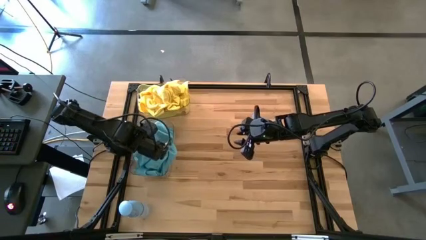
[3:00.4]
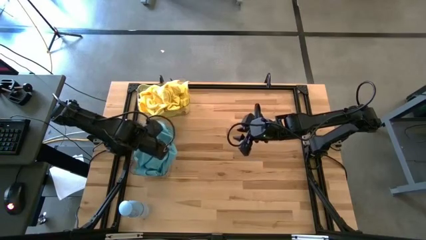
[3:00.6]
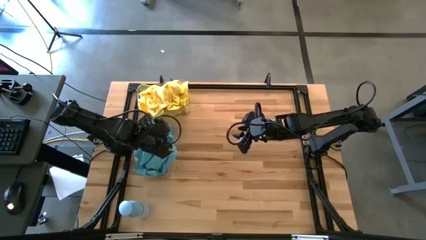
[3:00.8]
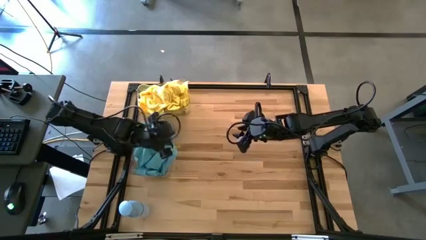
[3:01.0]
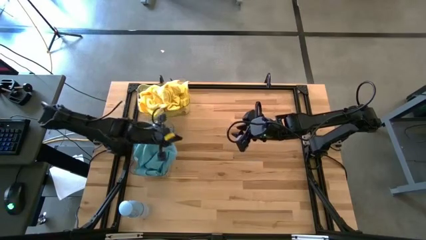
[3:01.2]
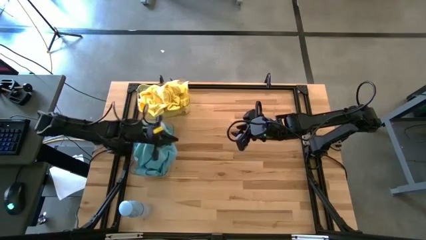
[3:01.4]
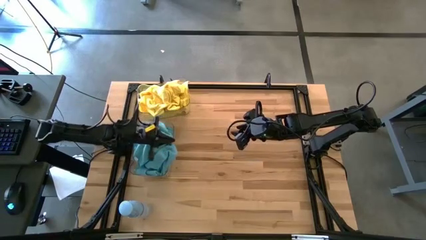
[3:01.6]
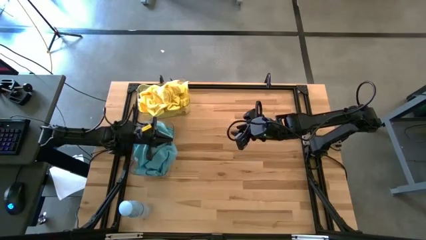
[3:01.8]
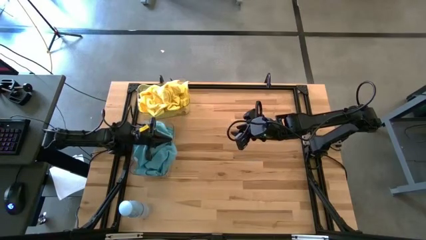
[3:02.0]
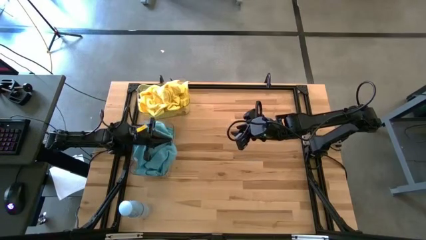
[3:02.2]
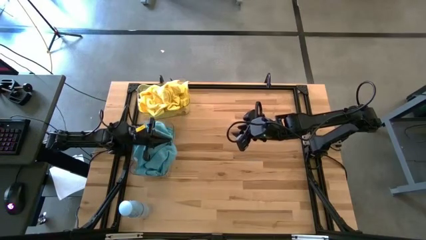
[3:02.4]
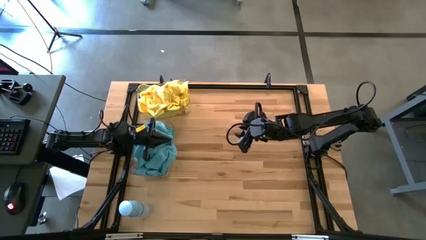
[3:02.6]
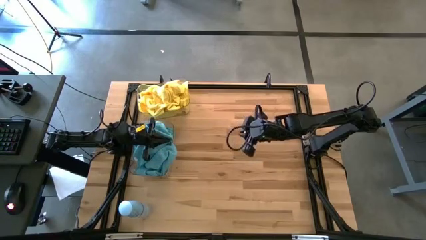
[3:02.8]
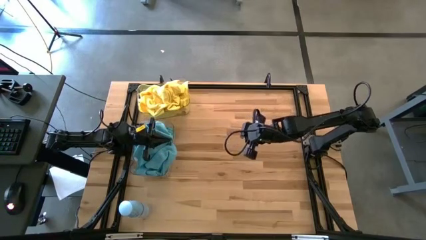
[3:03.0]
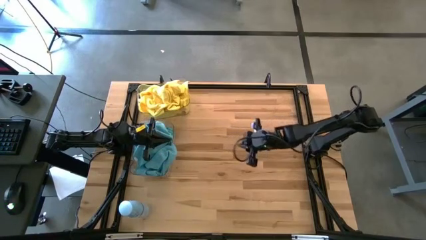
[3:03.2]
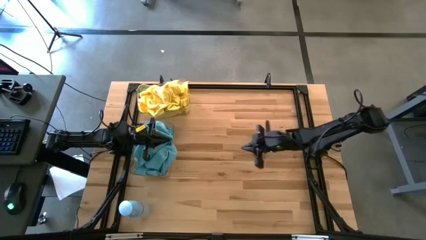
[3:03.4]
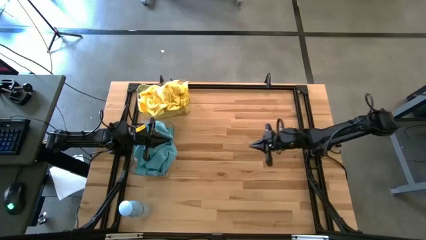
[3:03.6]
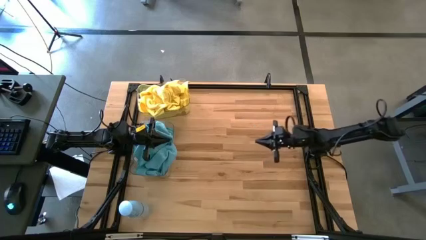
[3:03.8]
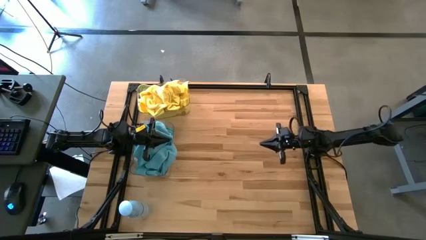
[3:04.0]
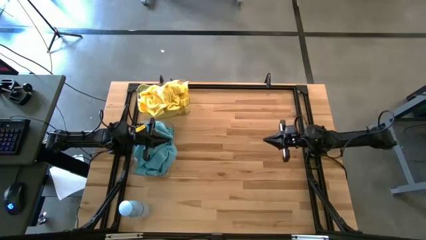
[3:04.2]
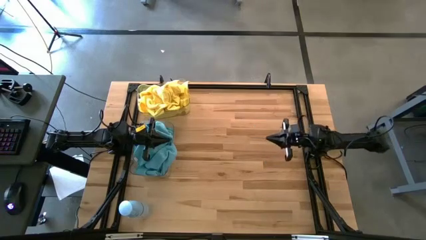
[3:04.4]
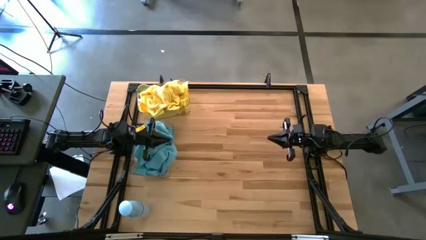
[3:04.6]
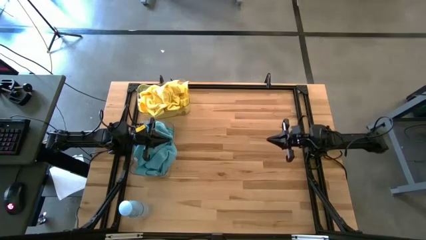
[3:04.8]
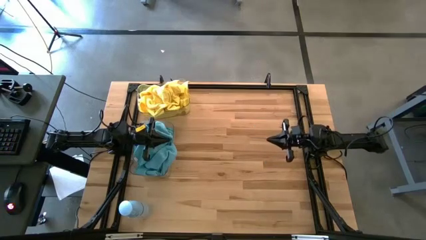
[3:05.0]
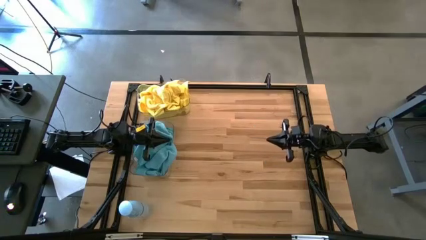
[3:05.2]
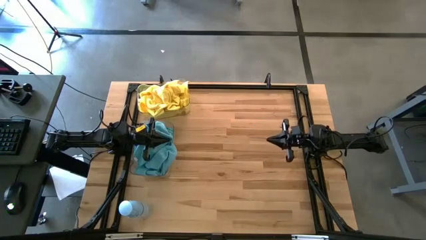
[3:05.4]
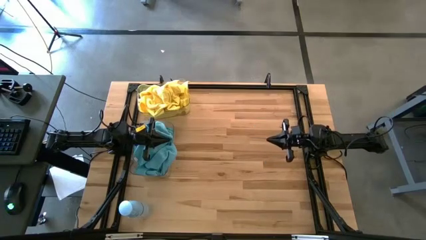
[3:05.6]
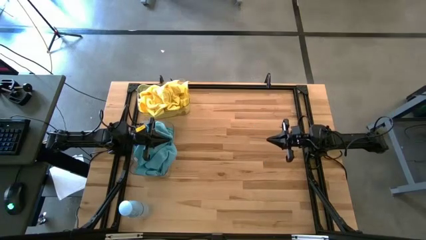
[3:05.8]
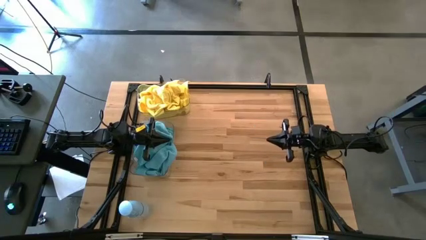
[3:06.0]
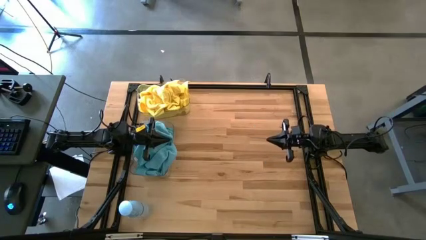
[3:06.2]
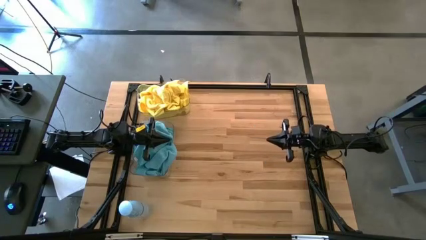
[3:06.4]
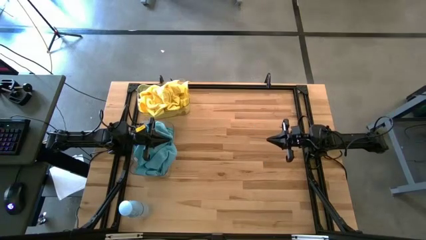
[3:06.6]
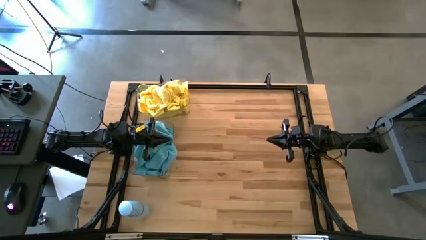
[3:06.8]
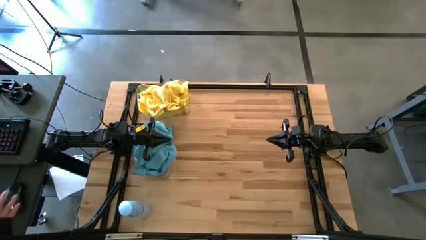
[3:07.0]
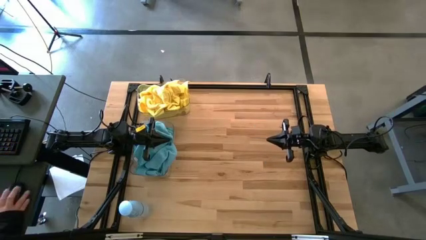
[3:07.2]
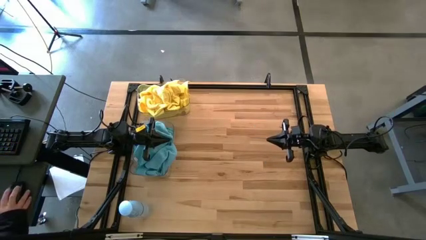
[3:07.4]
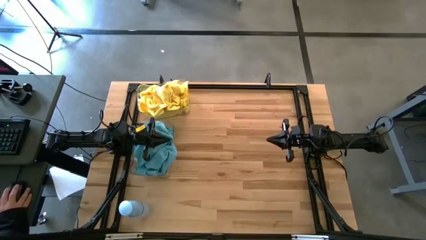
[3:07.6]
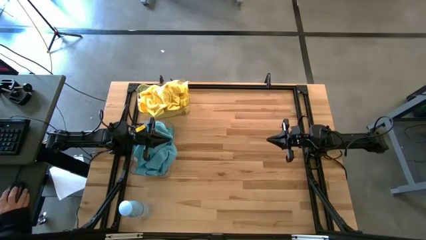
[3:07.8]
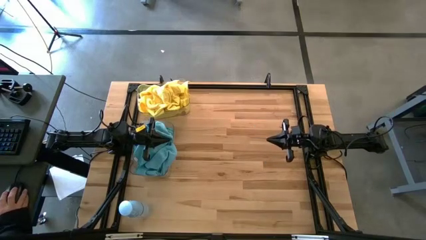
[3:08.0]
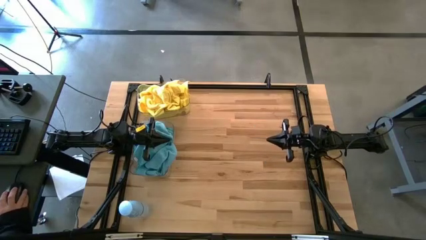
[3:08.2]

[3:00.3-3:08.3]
Task: Sort microfiber towel by color & place in baskets
Return to Home Position

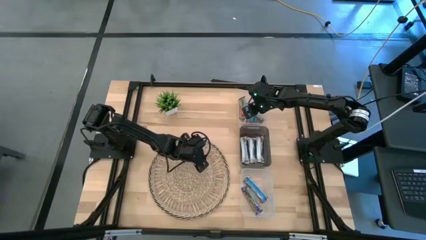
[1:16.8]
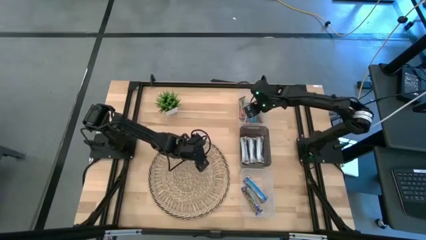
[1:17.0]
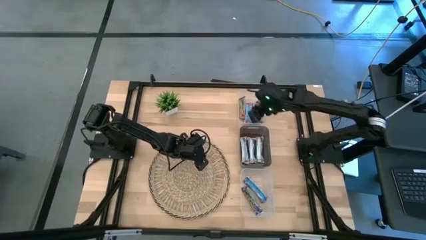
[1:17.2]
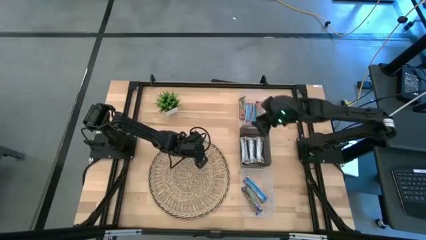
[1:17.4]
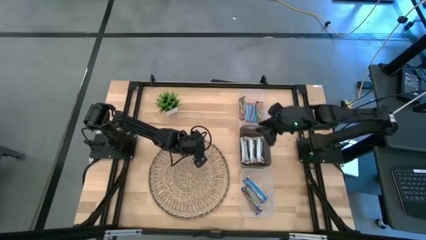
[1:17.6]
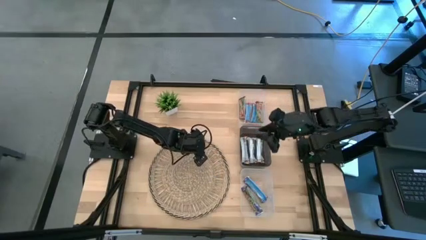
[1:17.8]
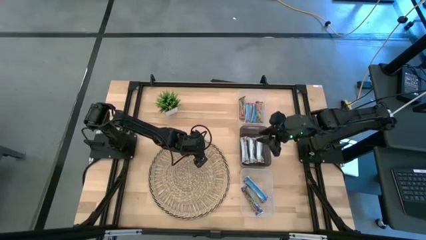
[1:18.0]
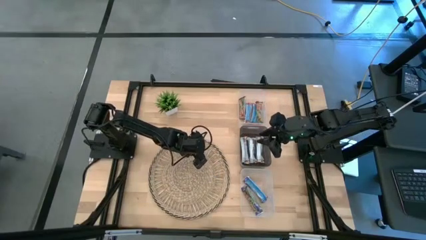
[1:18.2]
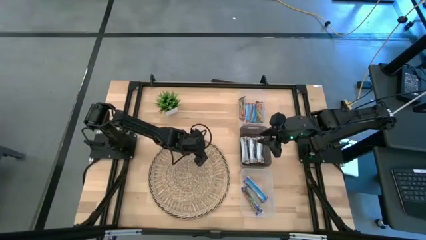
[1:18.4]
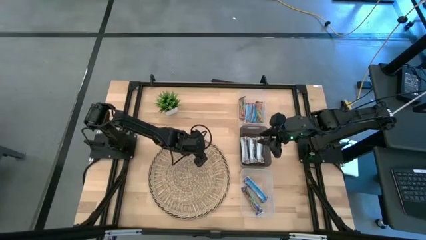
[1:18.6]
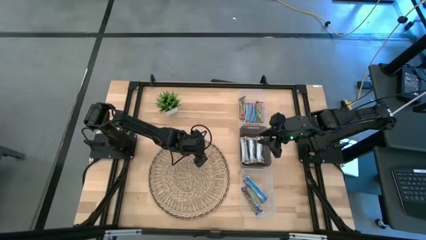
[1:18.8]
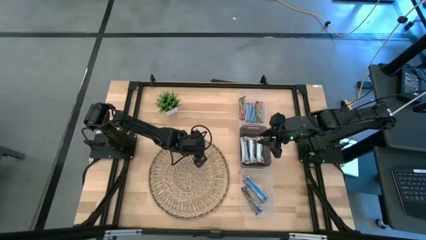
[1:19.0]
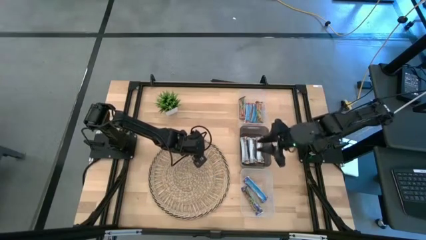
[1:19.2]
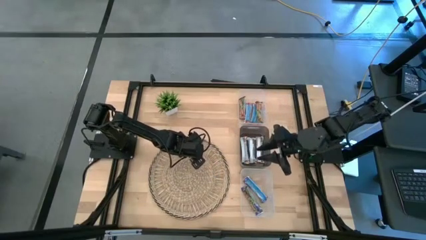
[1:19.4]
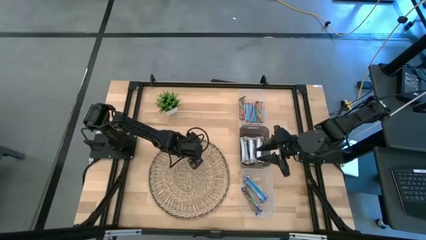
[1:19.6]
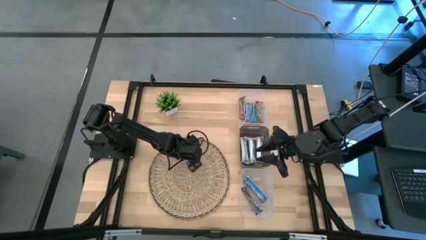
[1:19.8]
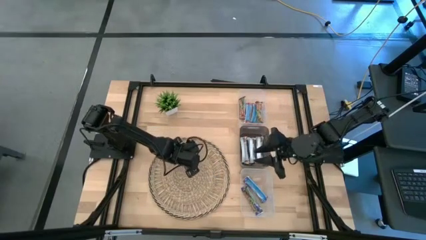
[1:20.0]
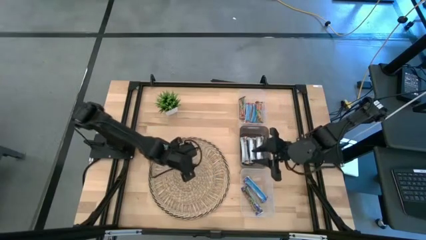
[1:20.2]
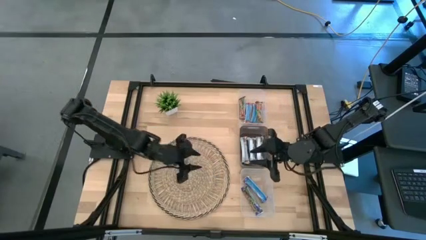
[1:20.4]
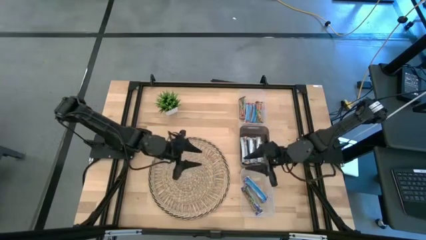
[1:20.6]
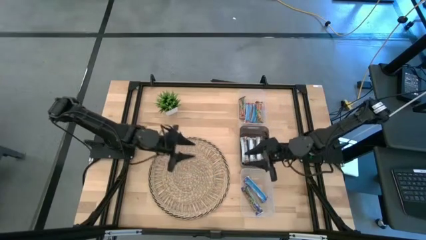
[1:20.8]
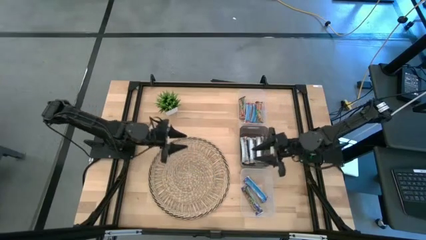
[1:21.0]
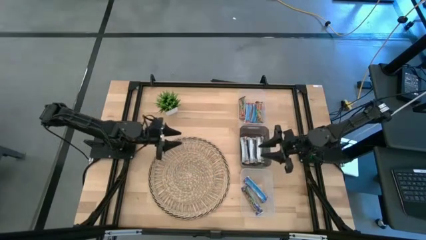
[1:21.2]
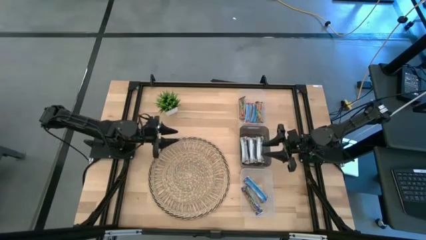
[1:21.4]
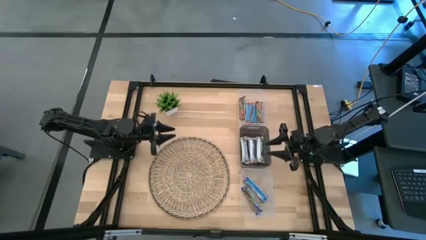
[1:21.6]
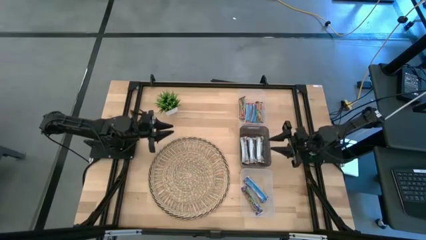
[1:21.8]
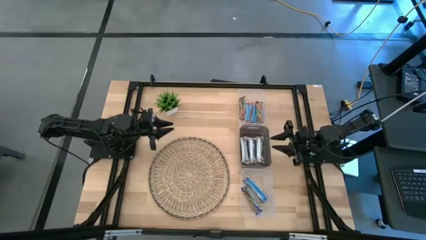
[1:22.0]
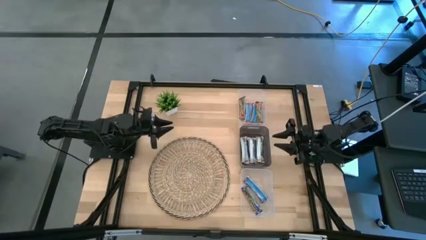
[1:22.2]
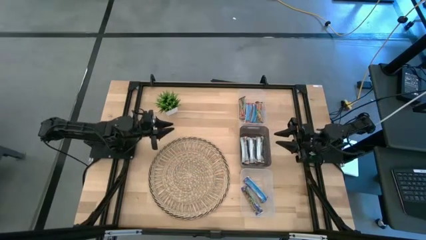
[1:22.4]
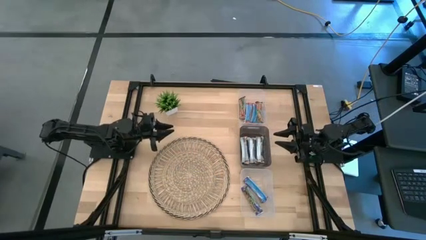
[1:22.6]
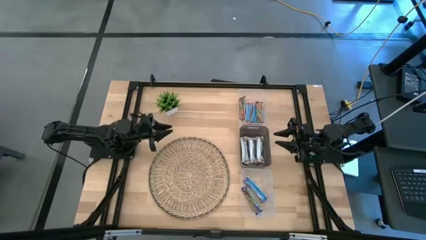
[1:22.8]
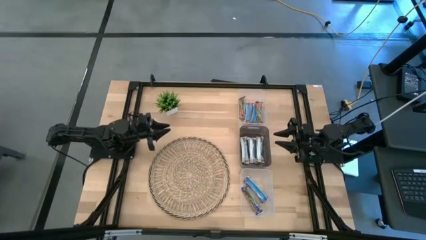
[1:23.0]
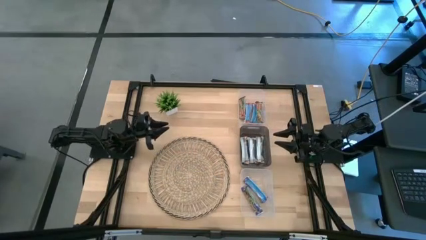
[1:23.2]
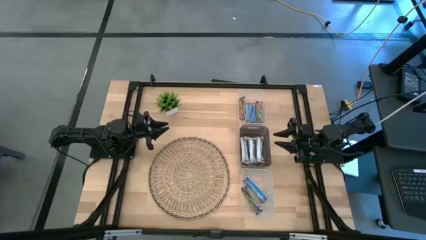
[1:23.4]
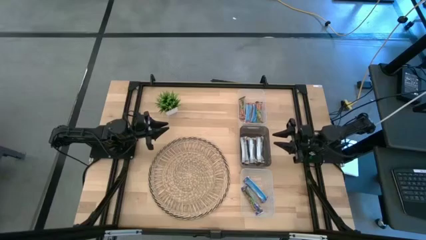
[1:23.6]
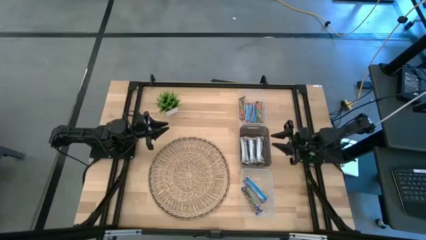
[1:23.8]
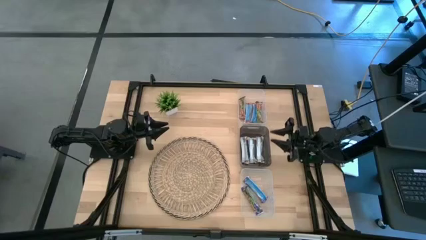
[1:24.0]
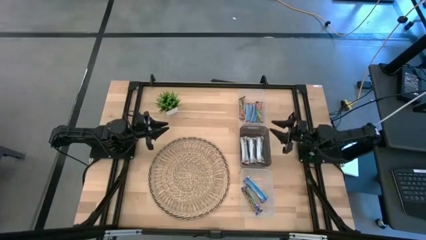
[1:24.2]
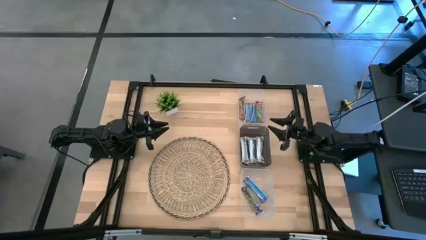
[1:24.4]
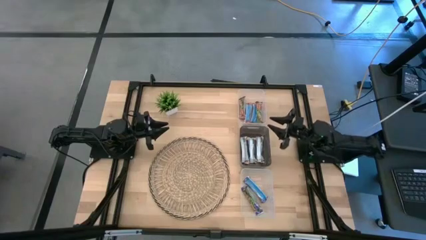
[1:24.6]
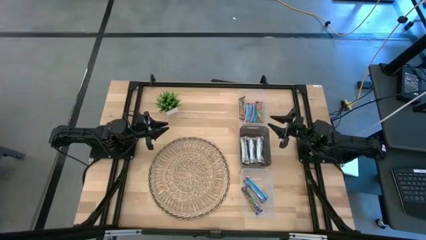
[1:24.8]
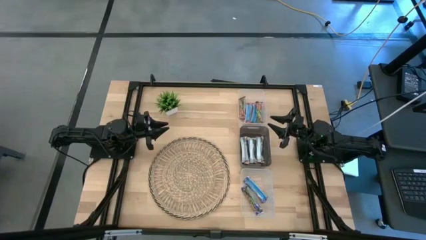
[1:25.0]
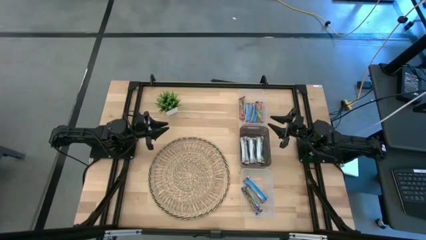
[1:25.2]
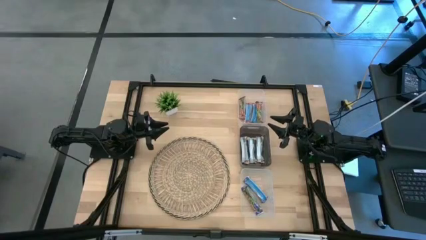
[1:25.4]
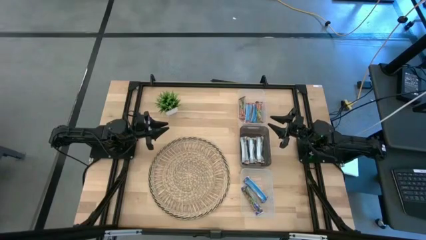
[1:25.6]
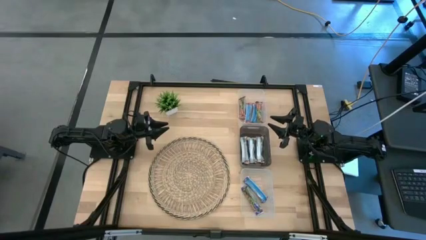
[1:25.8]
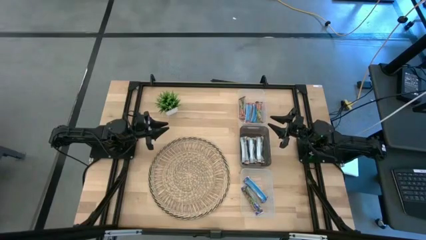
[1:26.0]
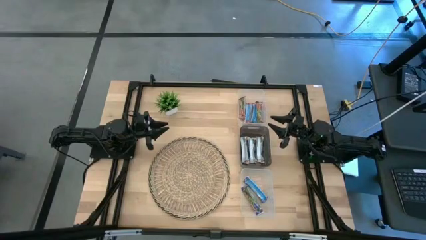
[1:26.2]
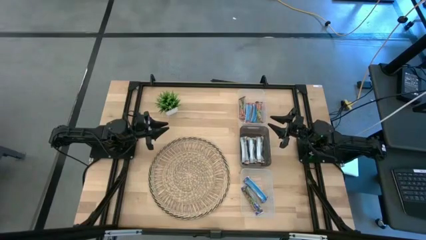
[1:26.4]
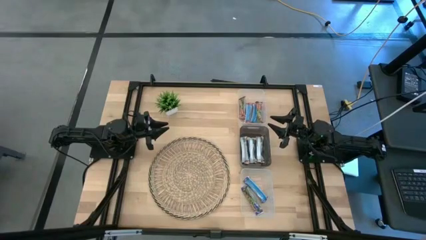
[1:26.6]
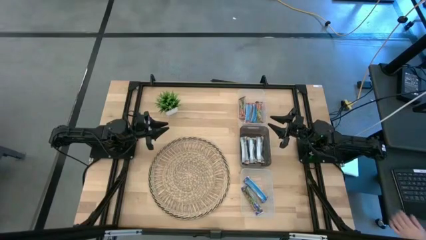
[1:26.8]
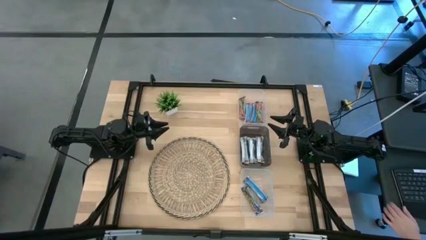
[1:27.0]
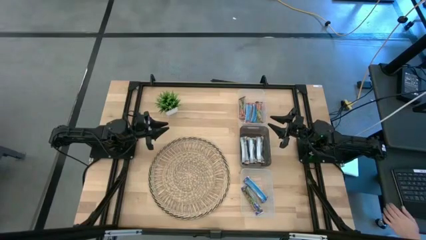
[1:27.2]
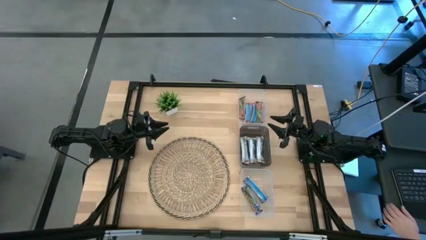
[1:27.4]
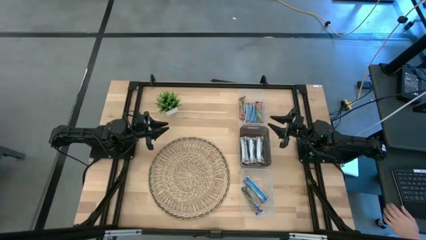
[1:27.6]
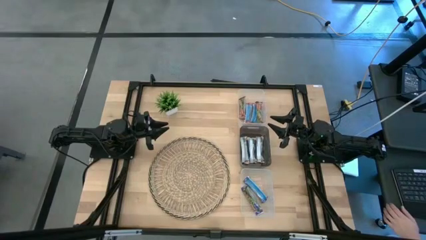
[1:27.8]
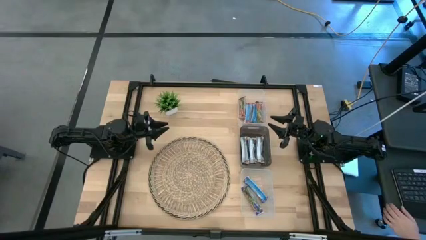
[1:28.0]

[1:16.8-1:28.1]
Task: Pick and place Granola Bars by type
Return to Home Position
